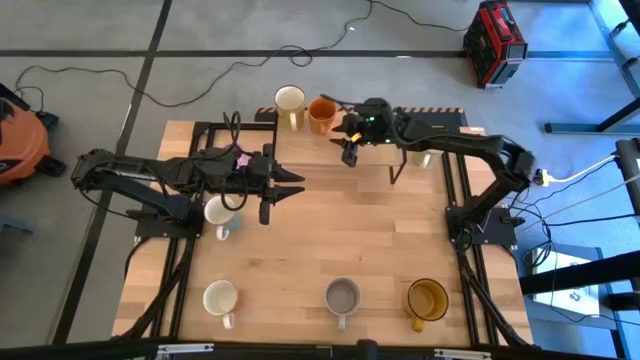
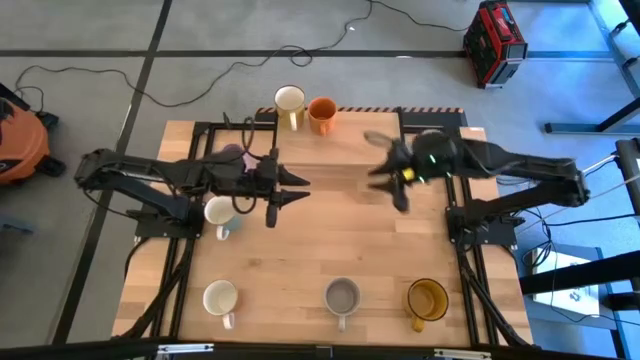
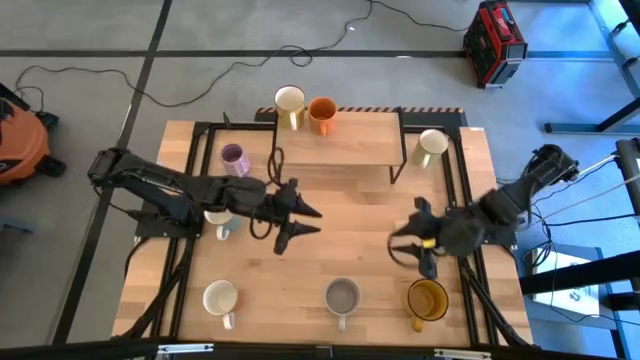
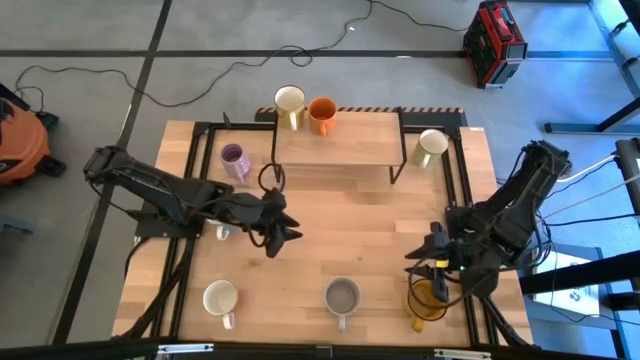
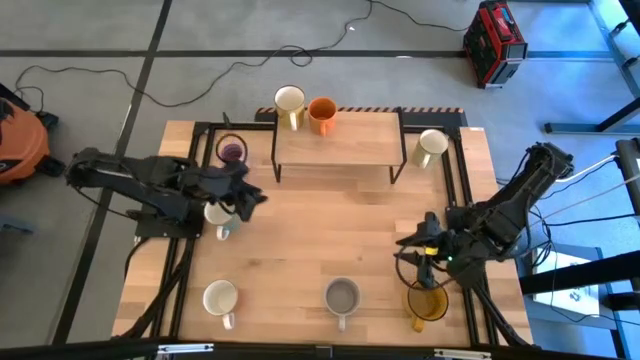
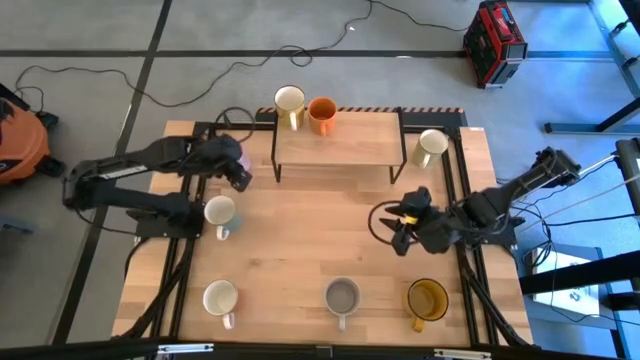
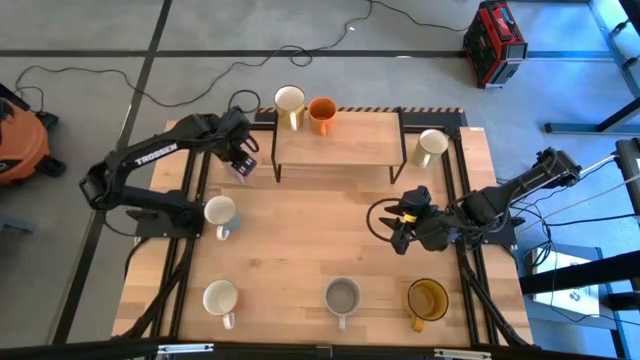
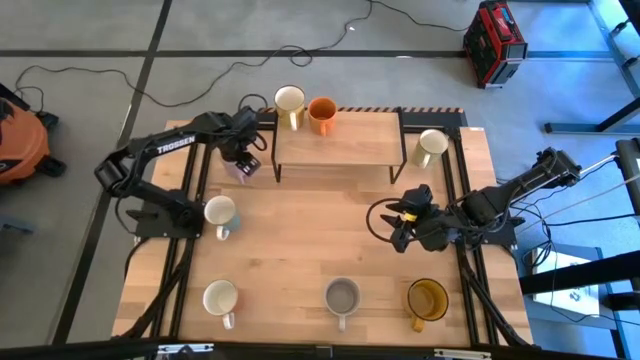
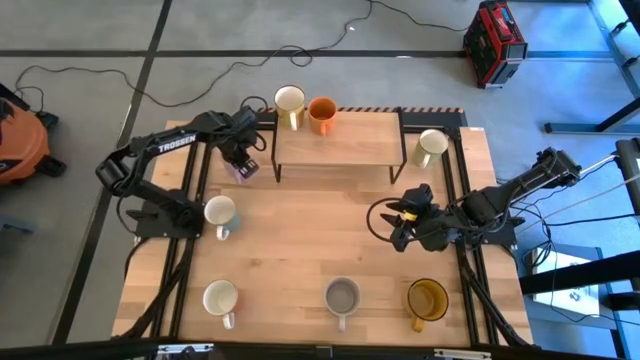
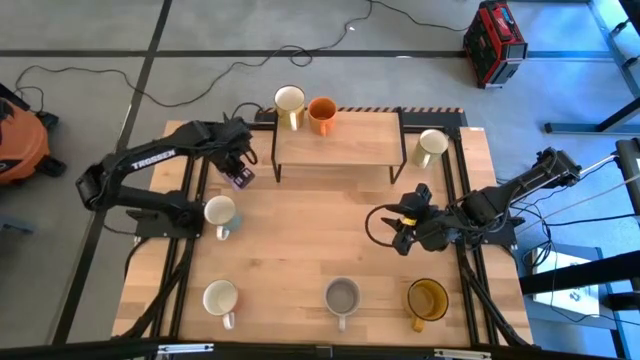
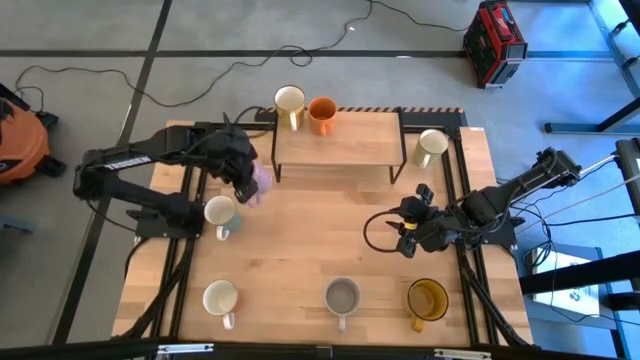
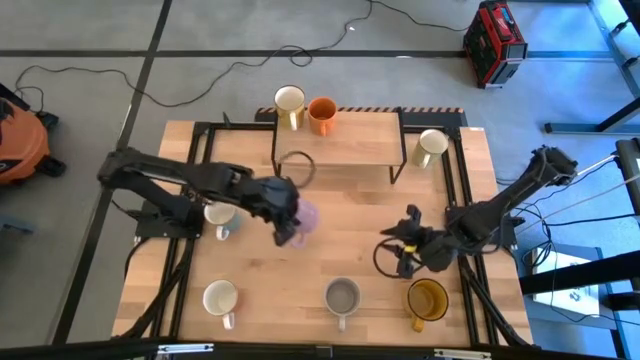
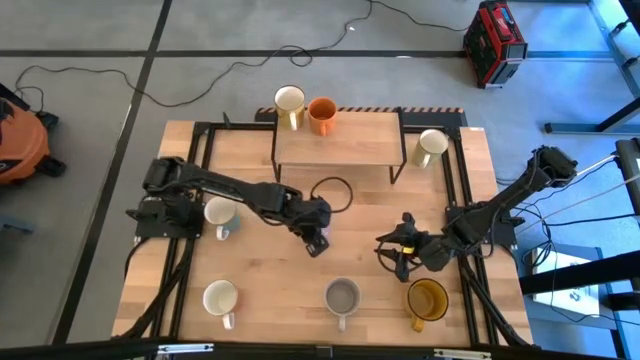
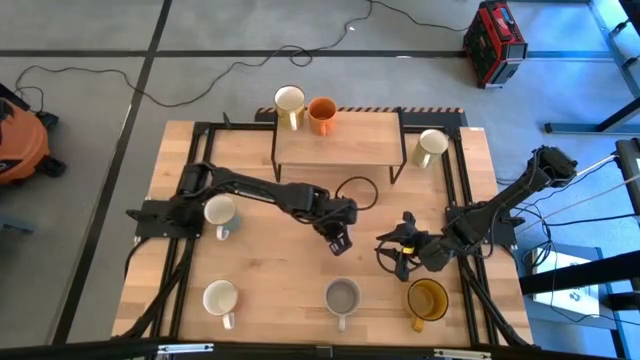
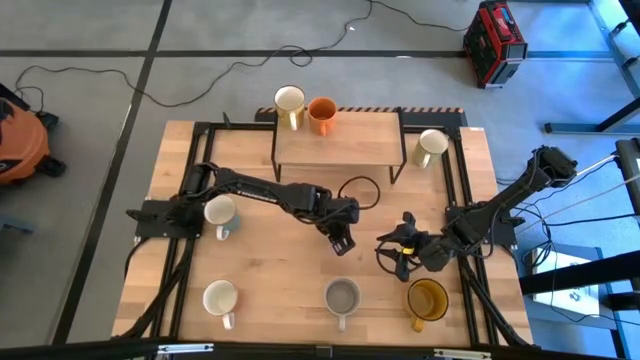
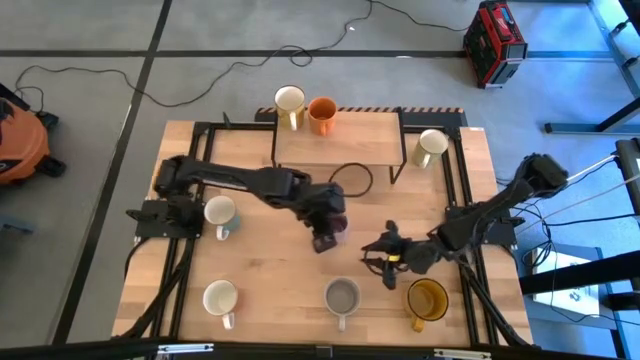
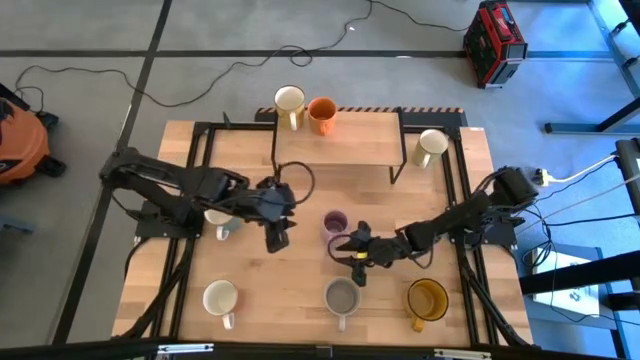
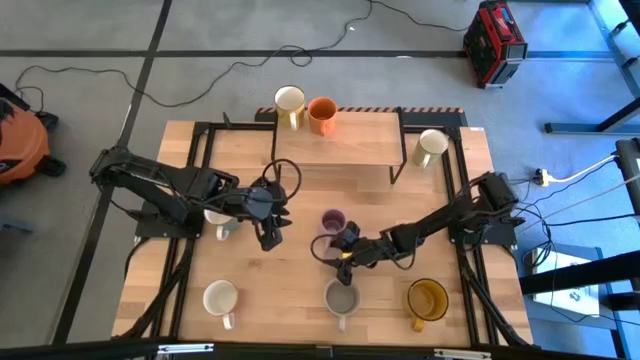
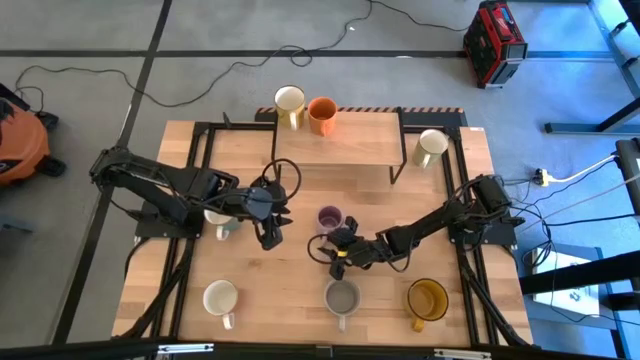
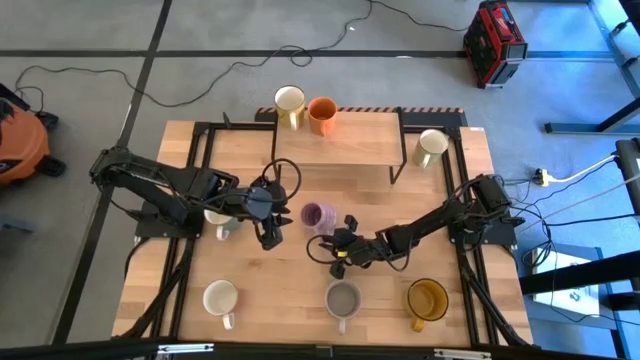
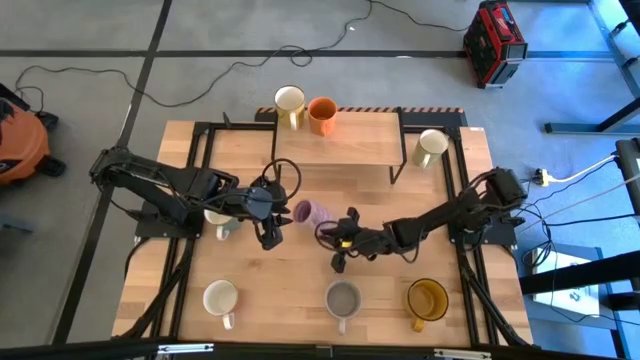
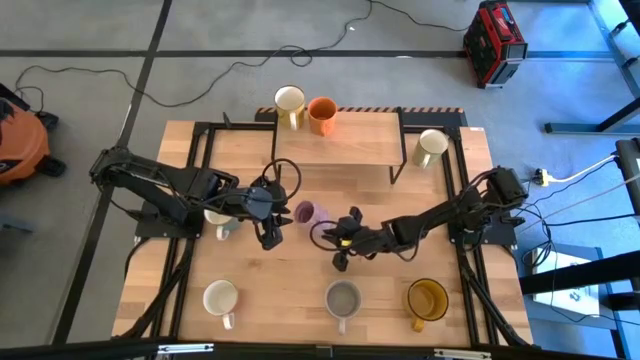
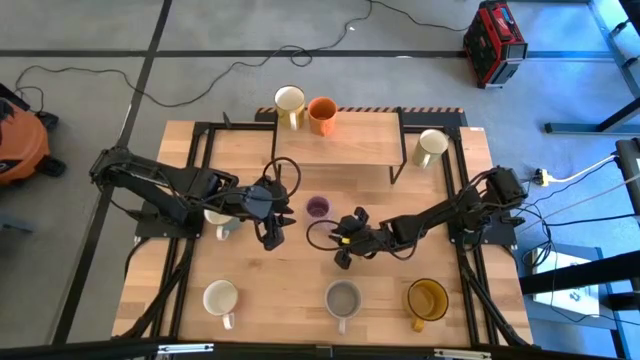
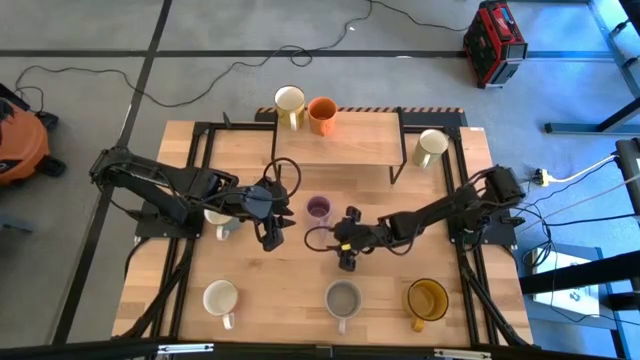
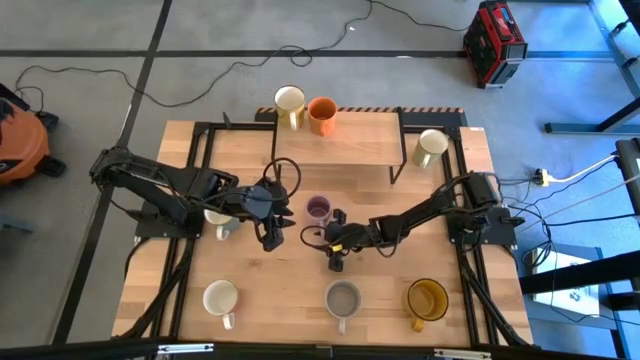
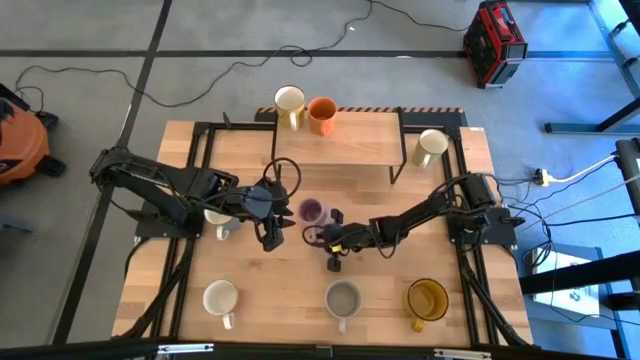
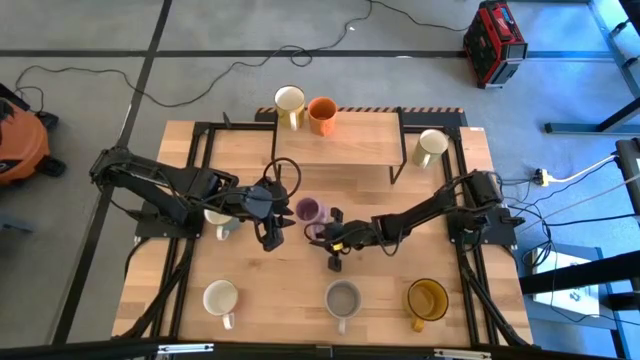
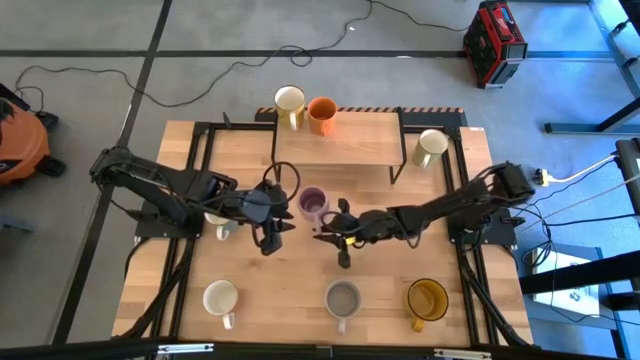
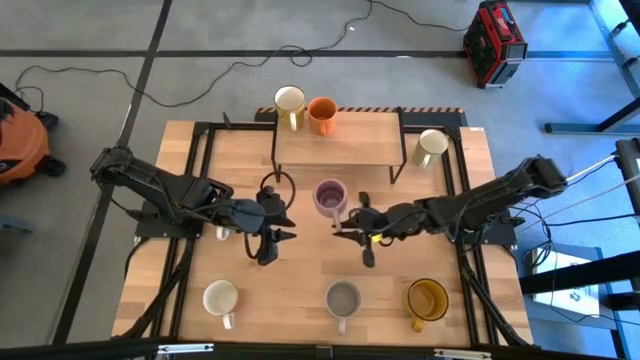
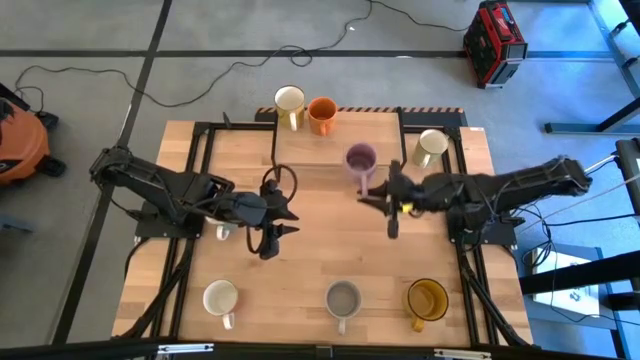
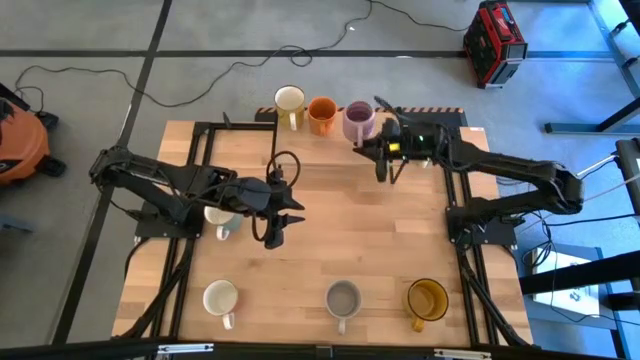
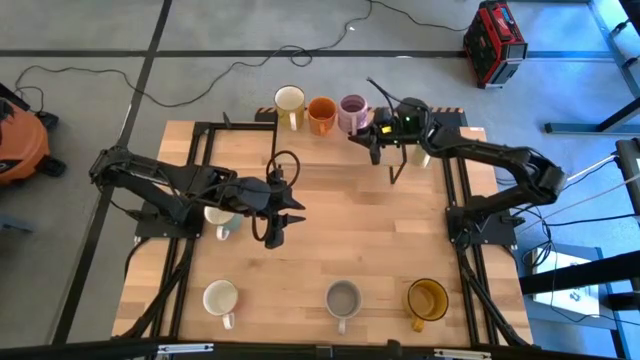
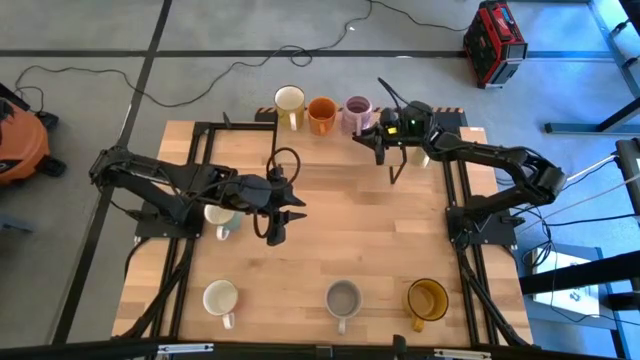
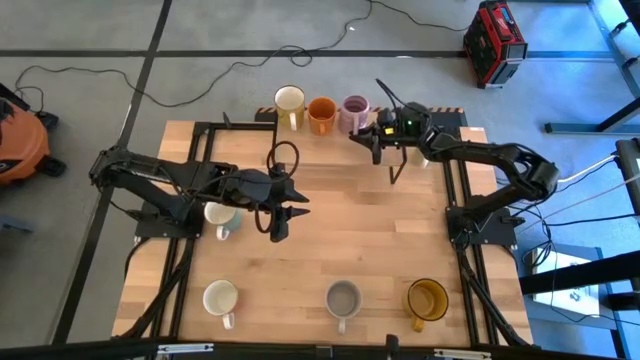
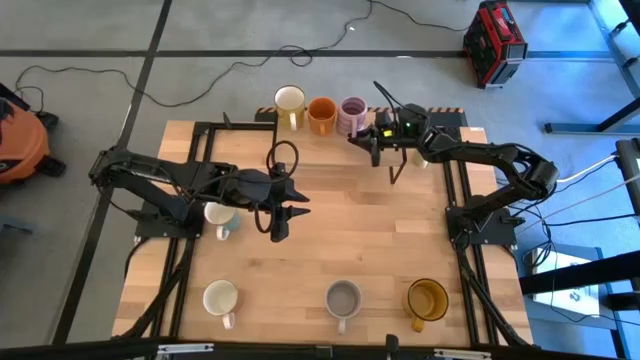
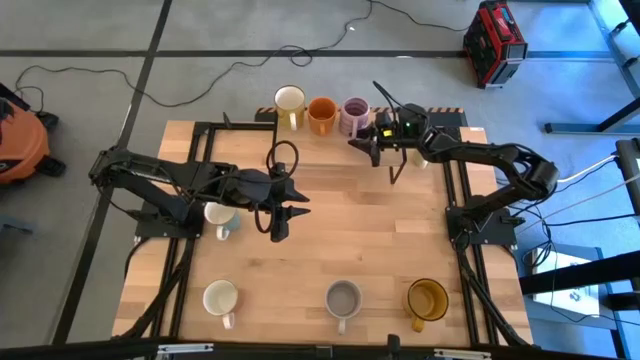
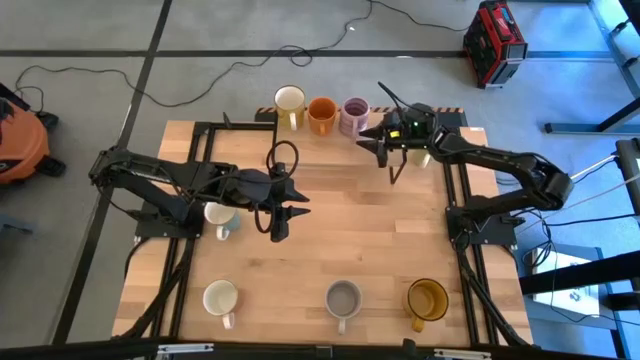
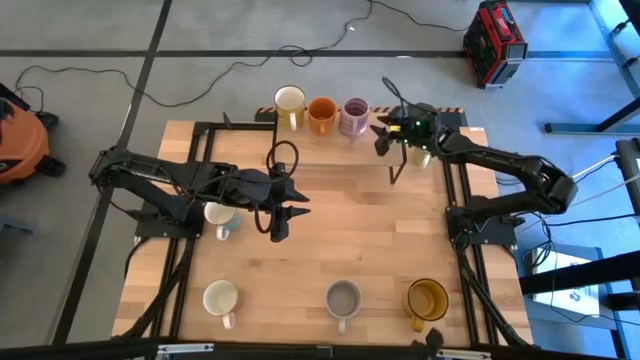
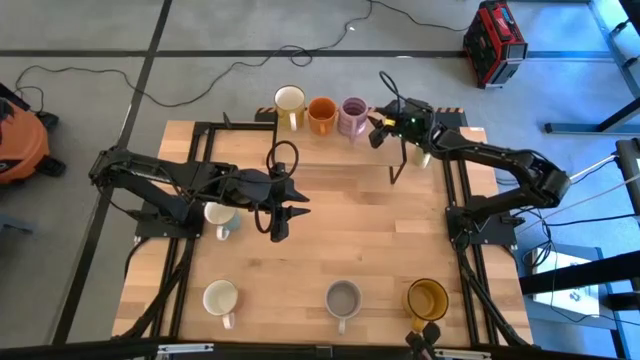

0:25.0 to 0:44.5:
Task: Place coffee mugs
Put the purple mug on the shelf
